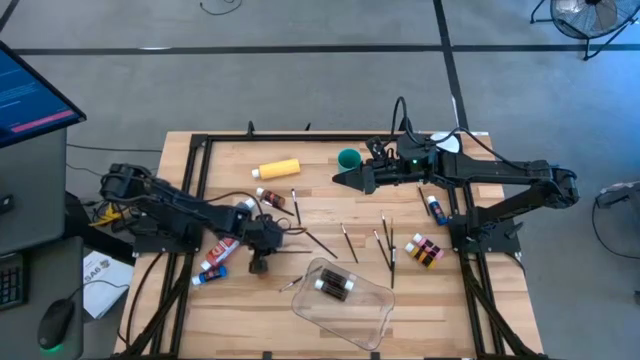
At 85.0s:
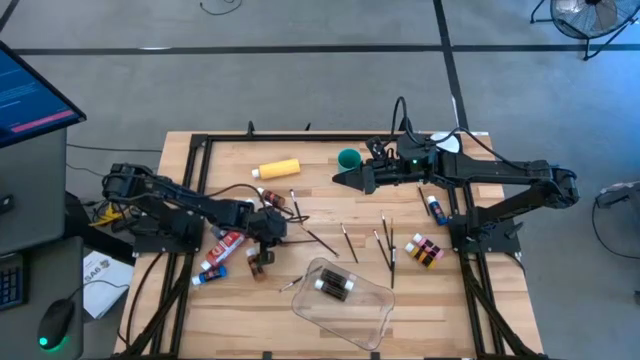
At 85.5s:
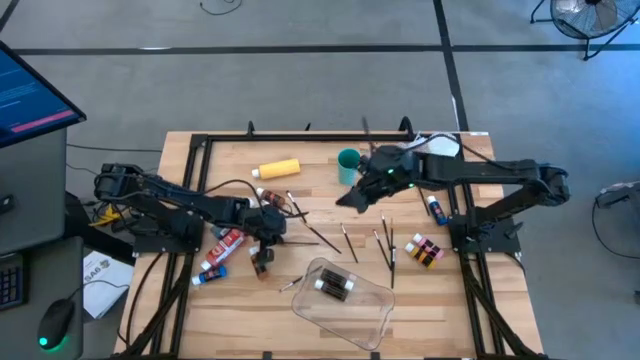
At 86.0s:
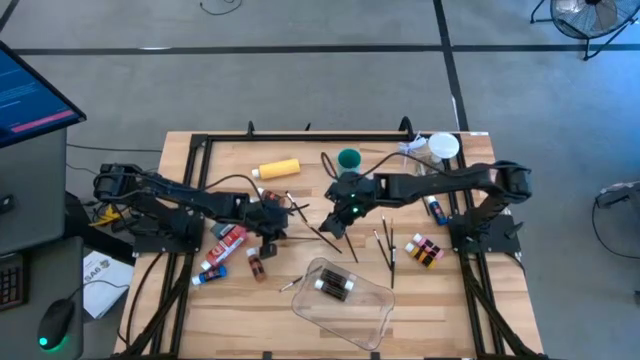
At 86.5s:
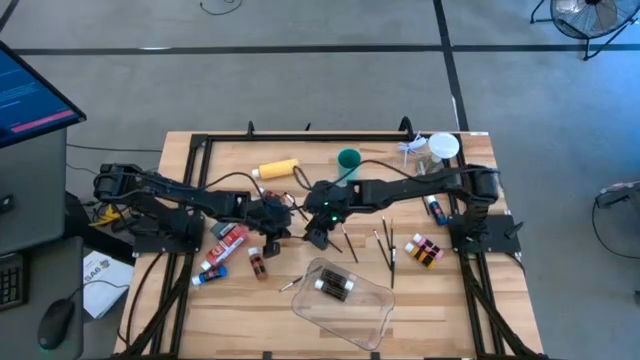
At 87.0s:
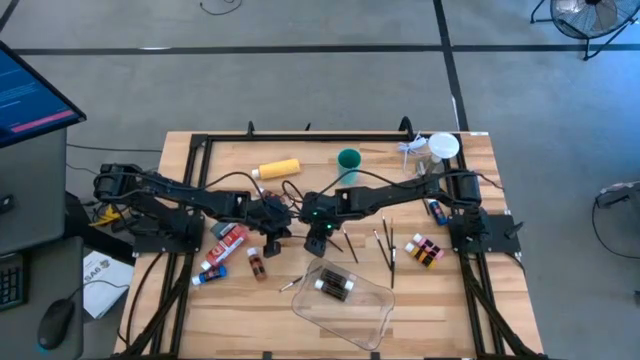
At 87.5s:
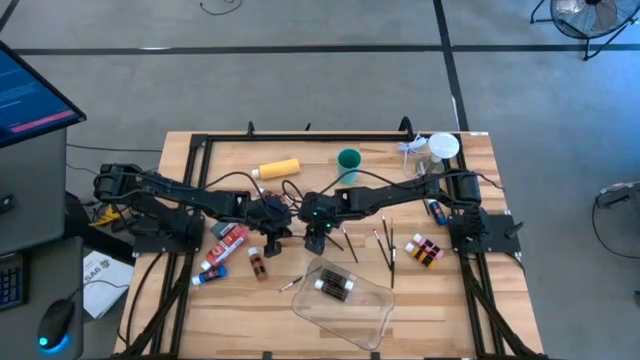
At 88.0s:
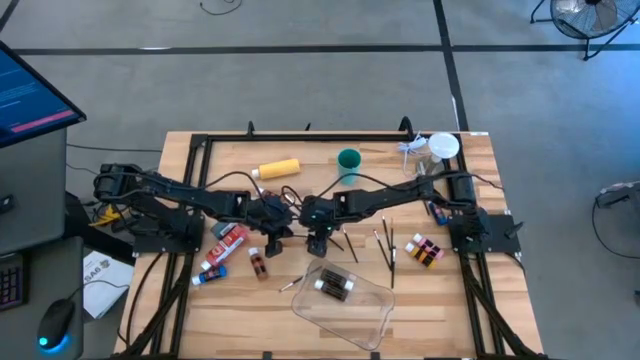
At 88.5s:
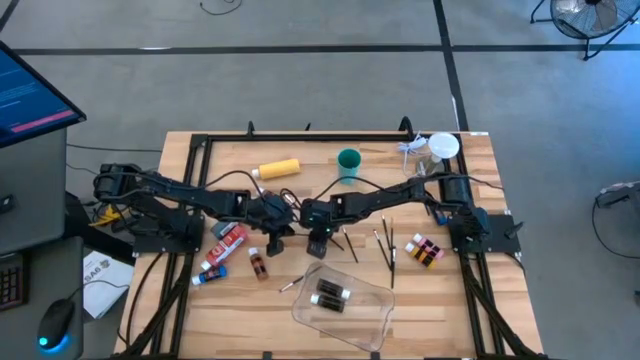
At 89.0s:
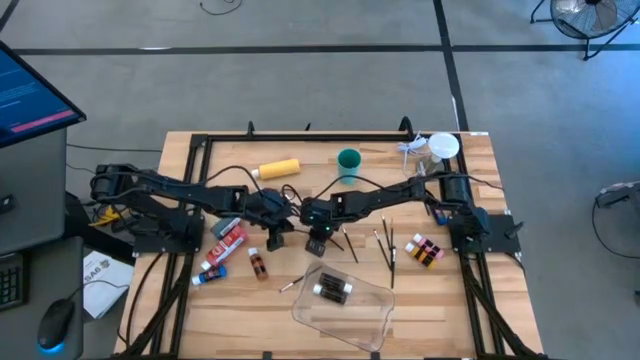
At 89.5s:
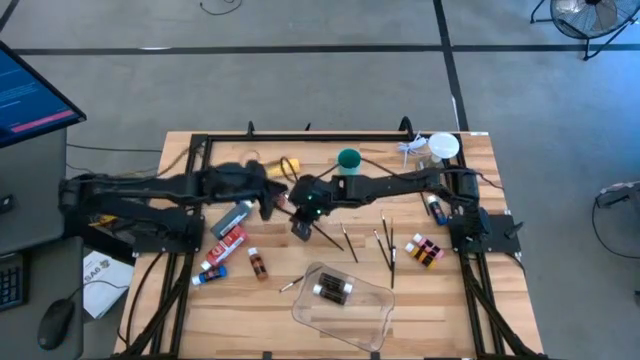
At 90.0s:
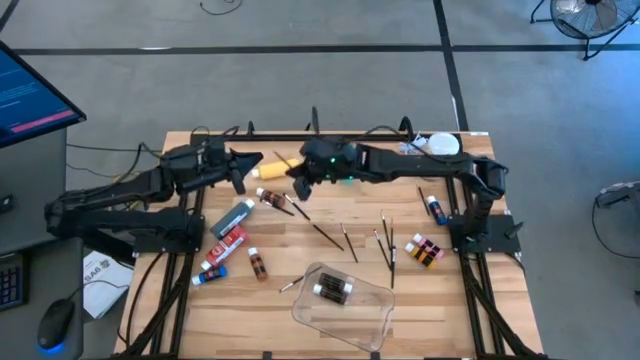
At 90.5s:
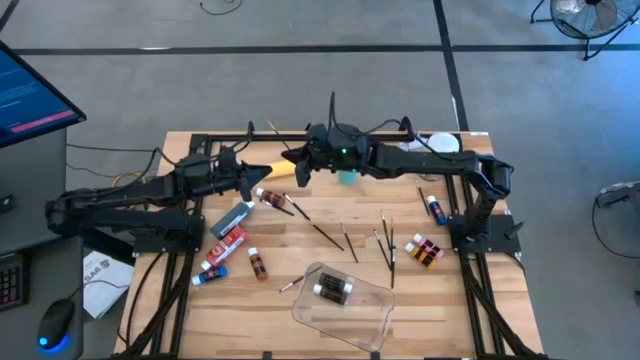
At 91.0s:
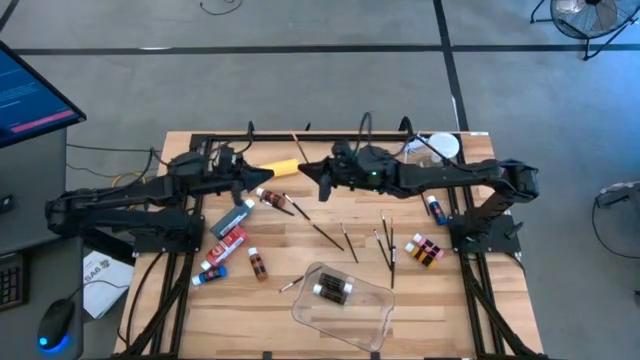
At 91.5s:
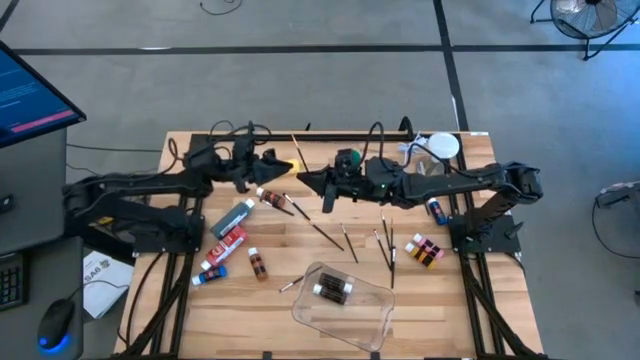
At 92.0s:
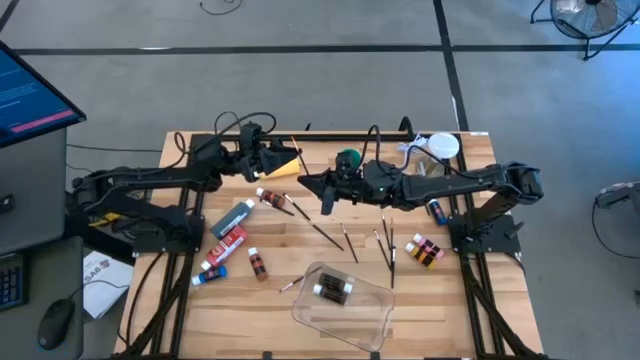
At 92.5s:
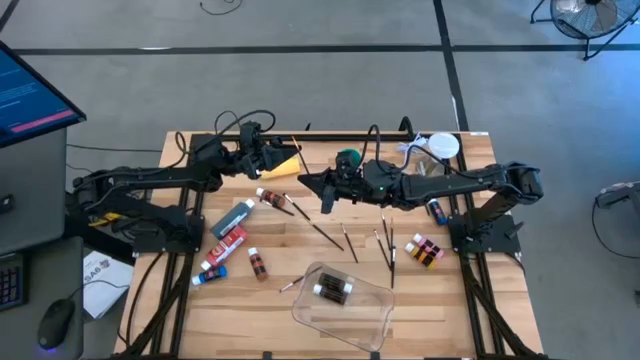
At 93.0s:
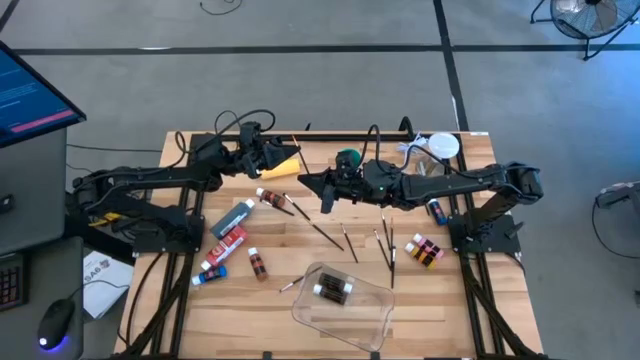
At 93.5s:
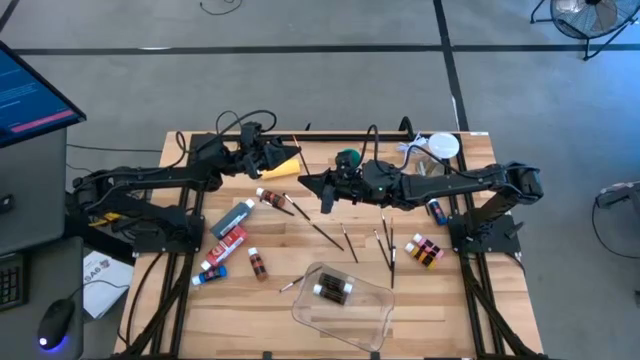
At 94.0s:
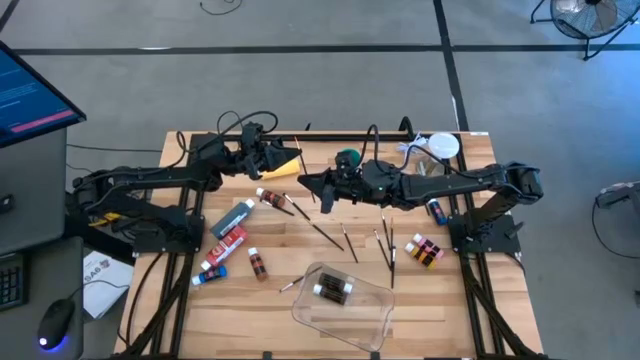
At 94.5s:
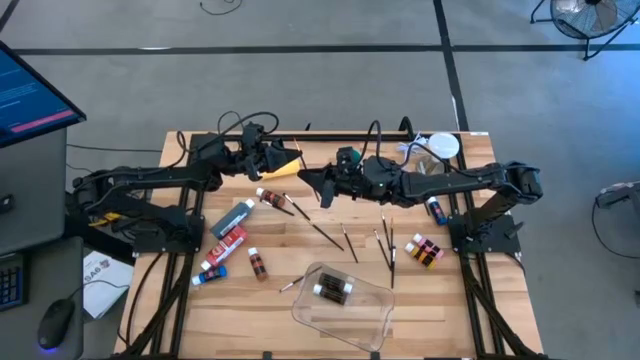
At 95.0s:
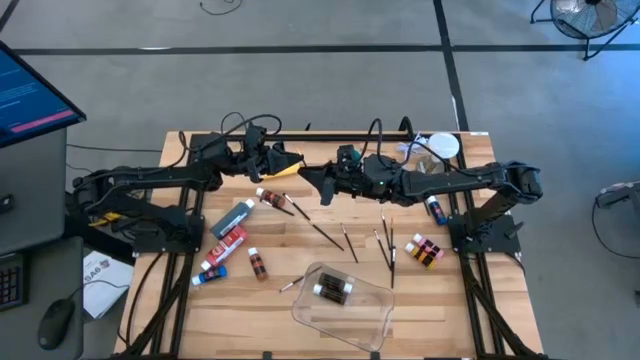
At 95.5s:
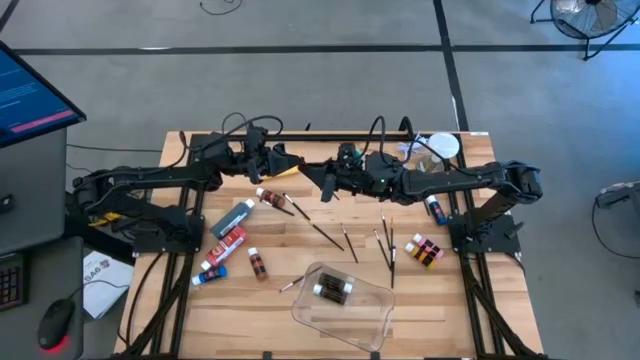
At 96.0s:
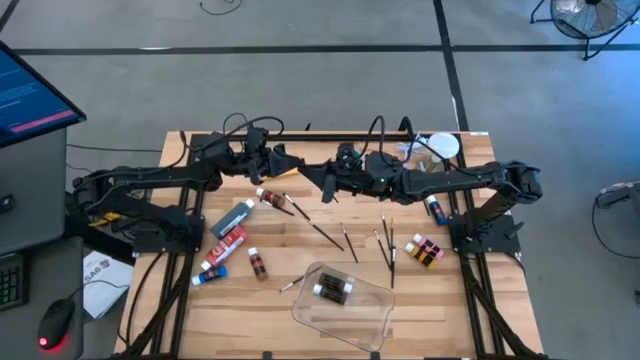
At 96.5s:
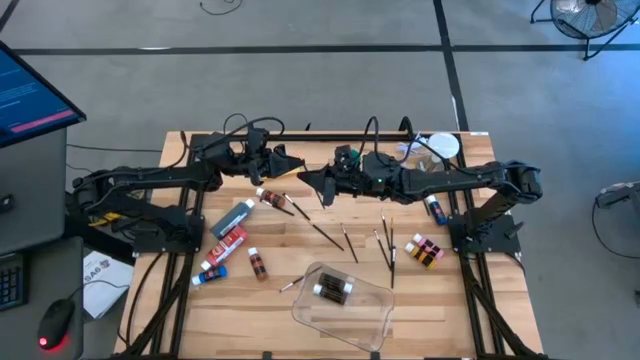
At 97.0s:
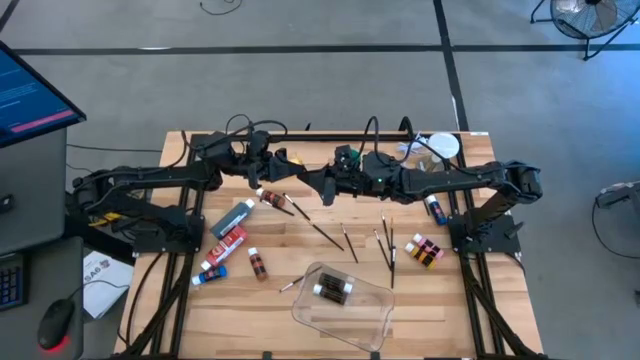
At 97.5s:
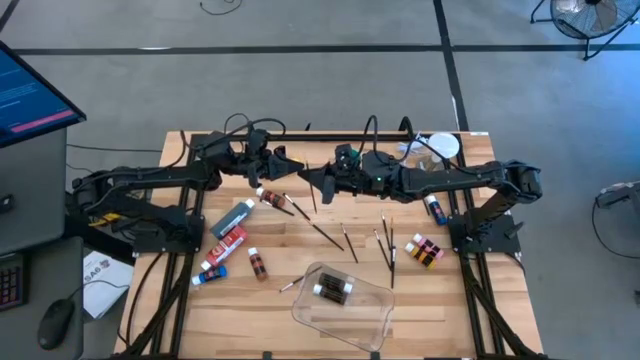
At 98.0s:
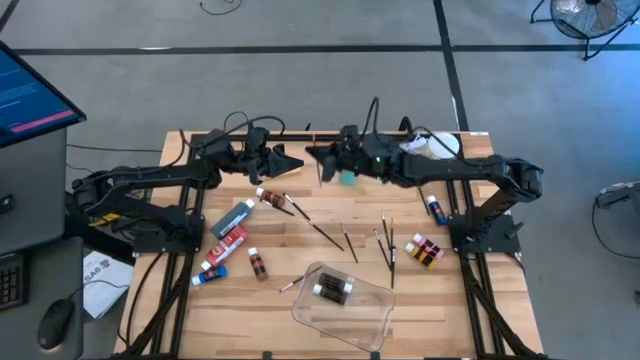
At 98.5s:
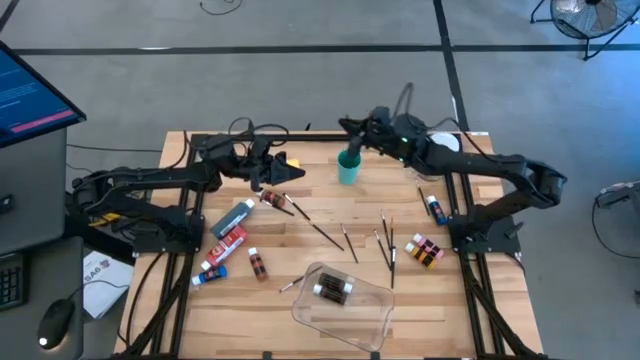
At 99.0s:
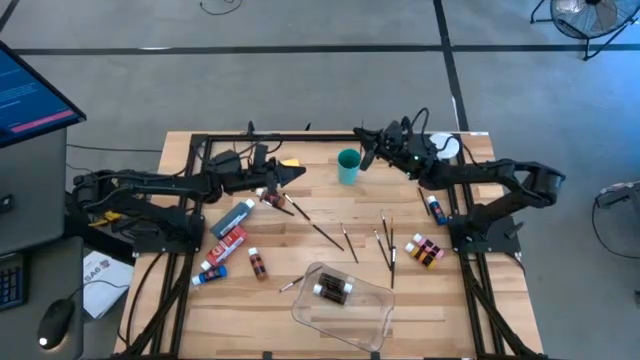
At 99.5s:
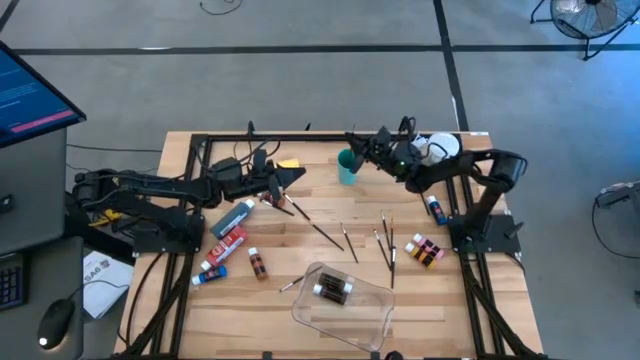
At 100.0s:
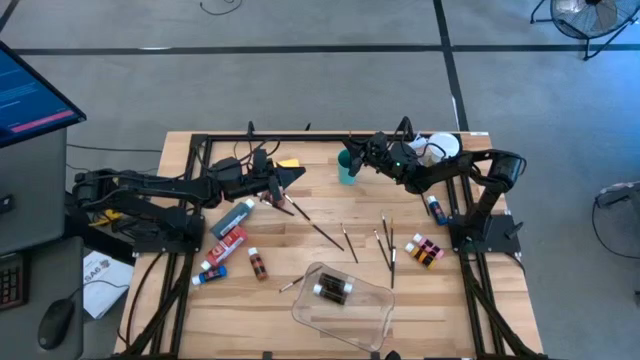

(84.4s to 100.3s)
Task: Pick & Place Paint Supplies
Put the gold paint brush into the green cup

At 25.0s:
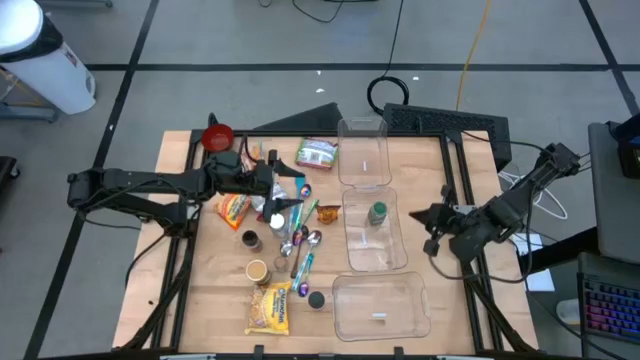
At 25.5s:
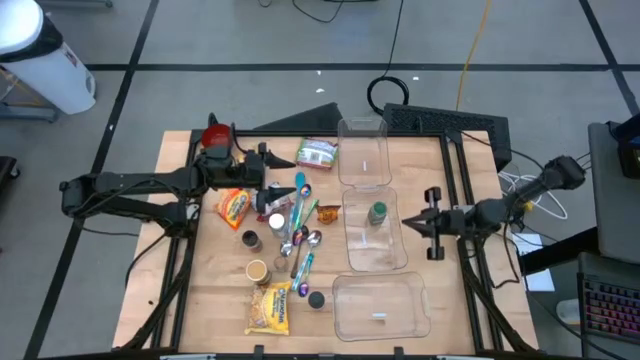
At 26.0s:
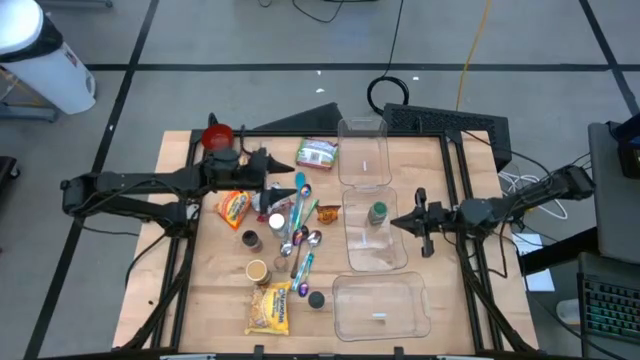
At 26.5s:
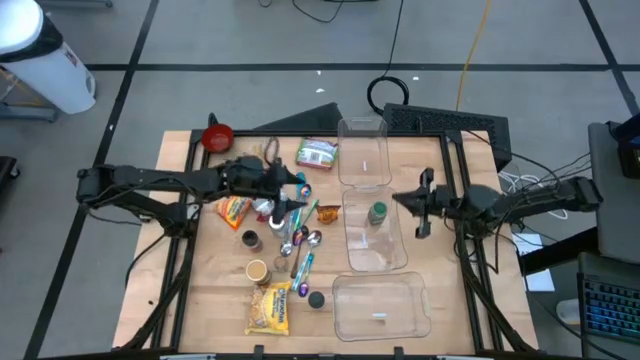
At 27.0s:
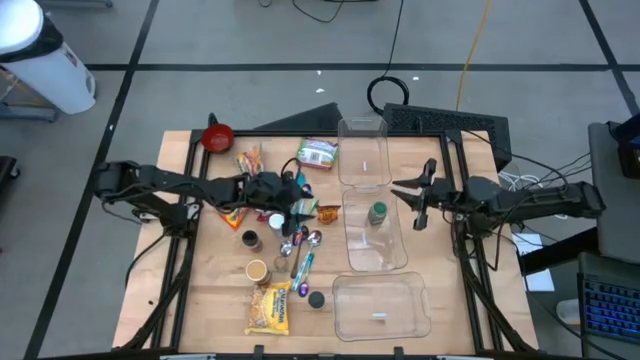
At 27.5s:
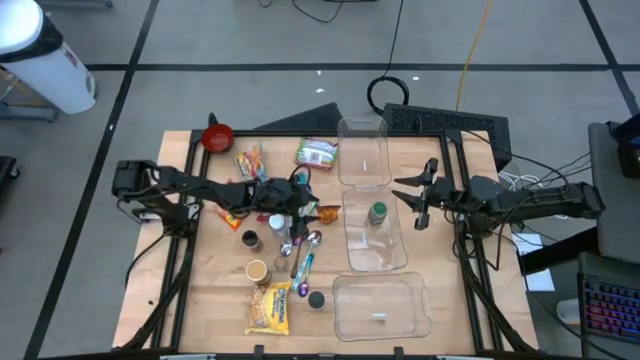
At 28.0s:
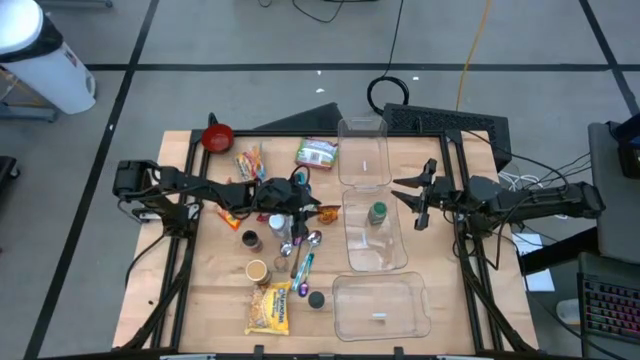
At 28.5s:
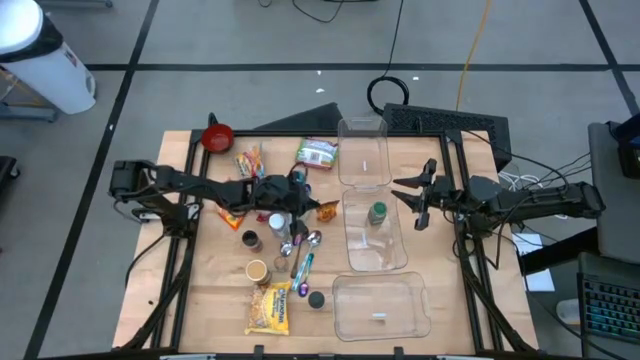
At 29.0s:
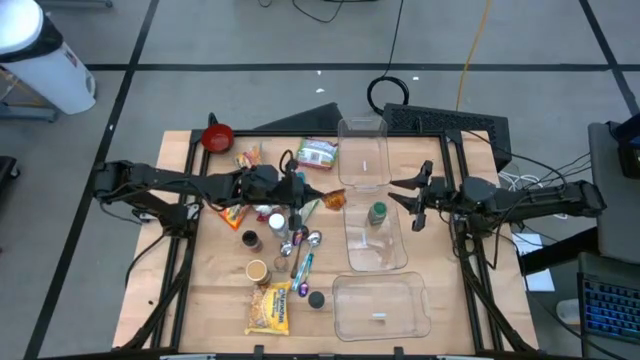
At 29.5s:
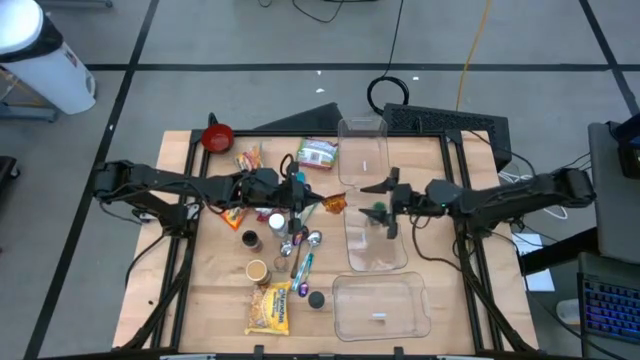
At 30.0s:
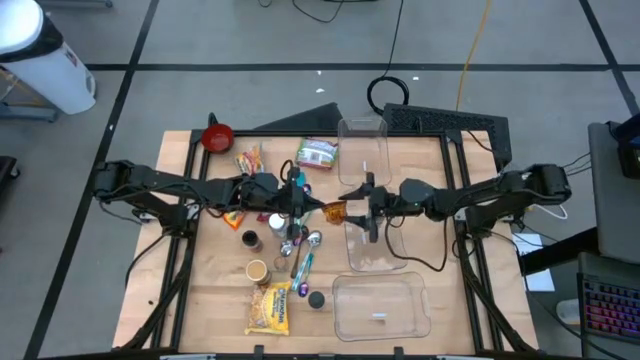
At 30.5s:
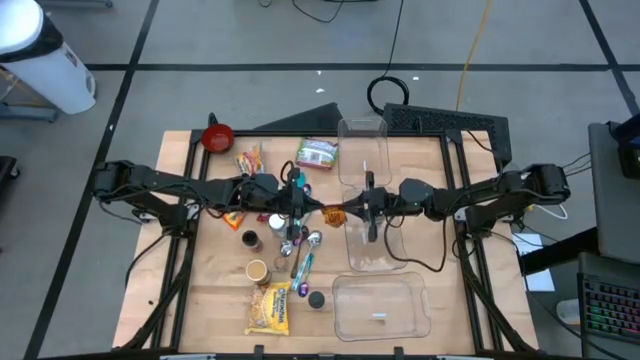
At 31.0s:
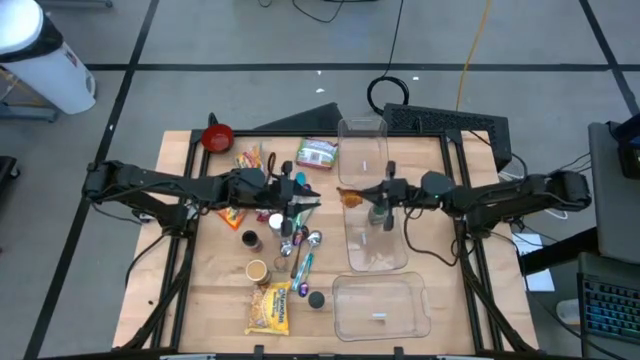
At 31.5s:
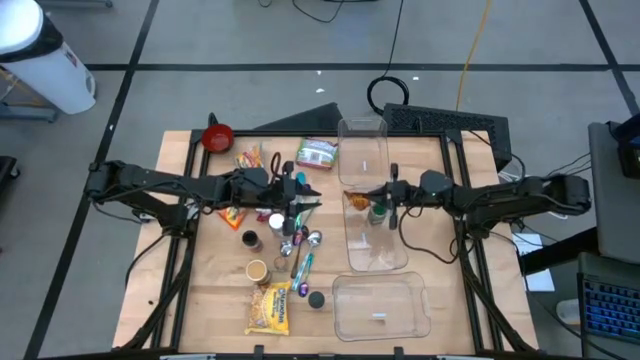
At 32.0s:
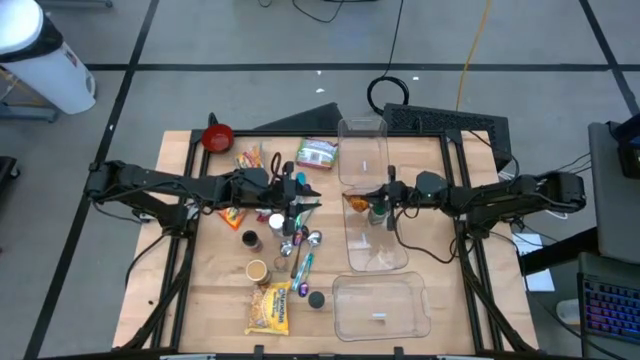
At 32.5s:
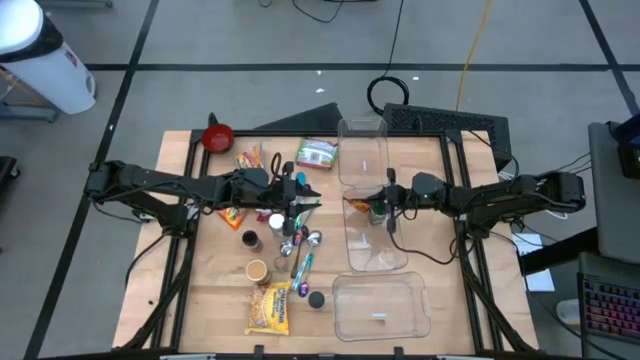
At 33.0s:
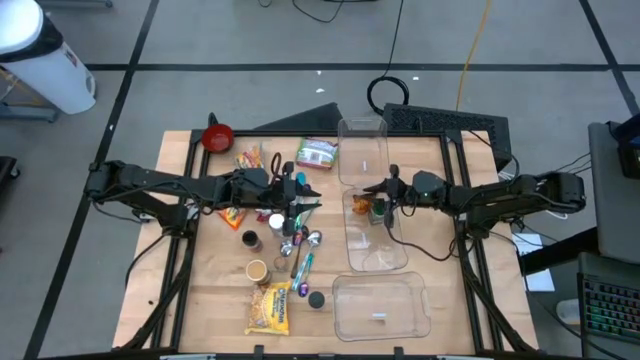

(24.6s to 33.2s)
Task: Pick & Place Food Item
Put the orange seasoning pack into the middle transparent bin
